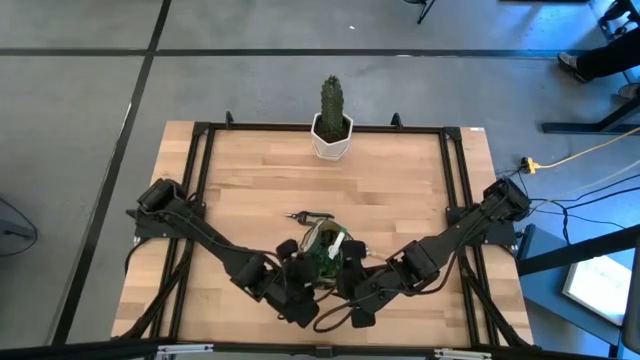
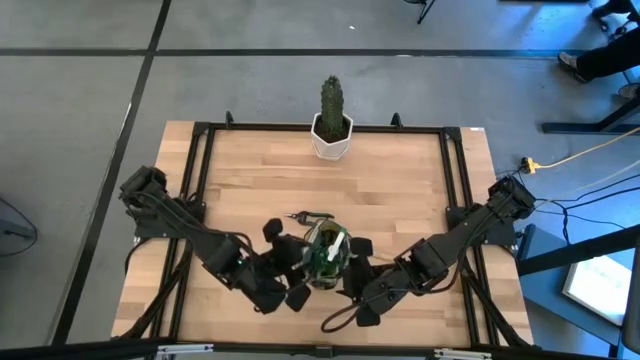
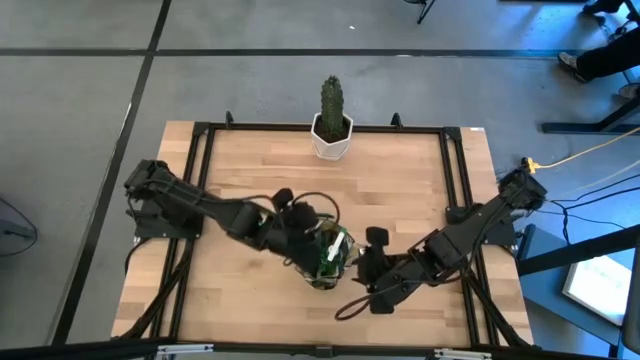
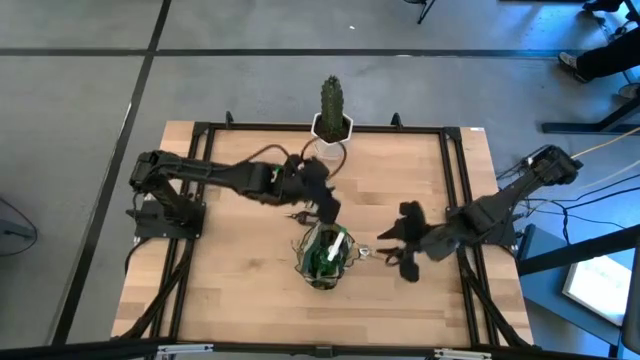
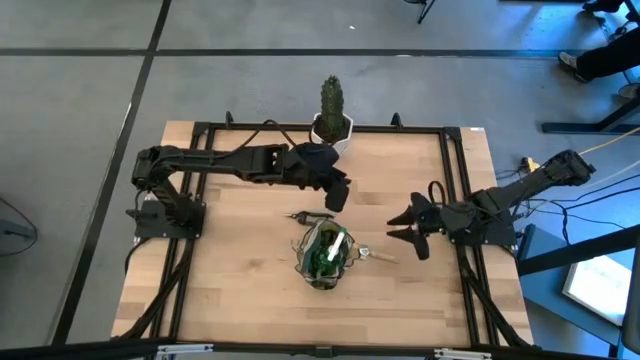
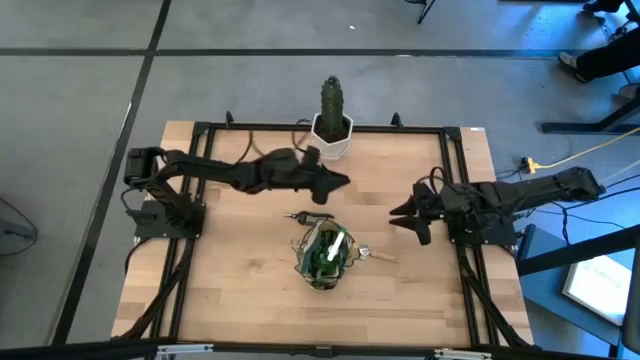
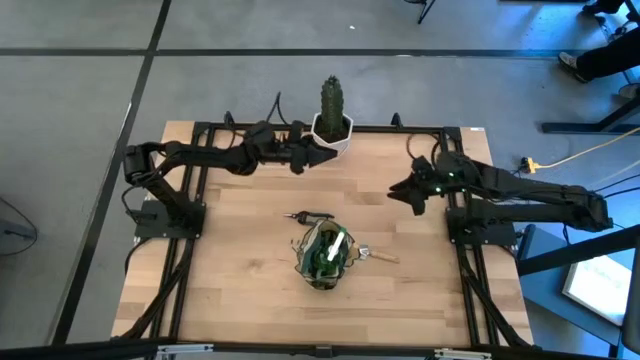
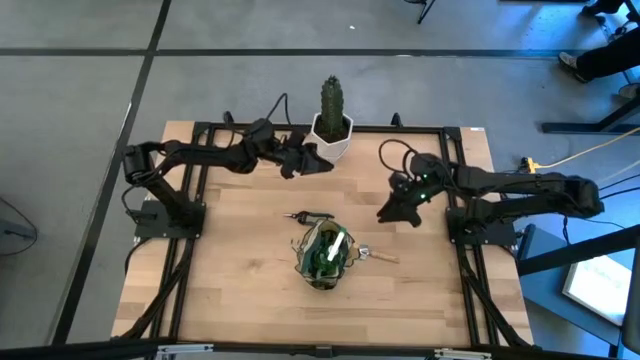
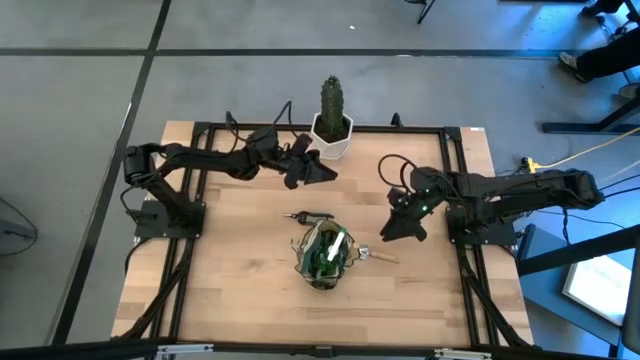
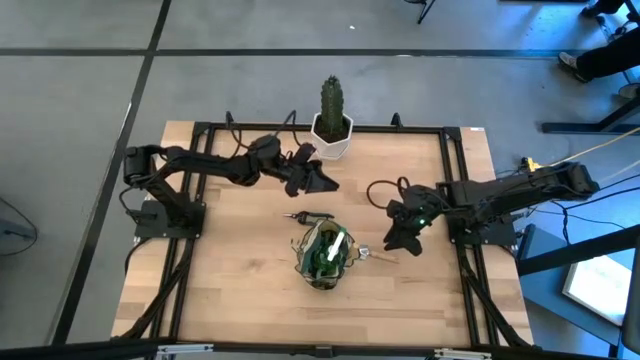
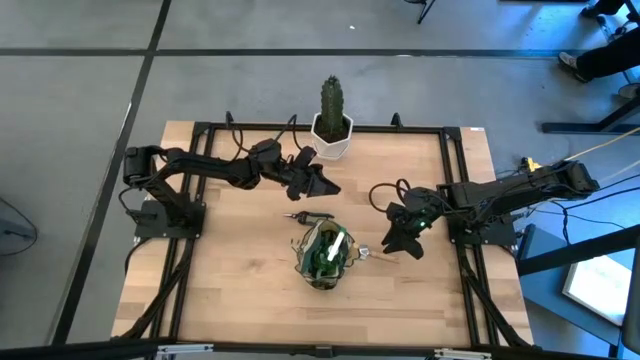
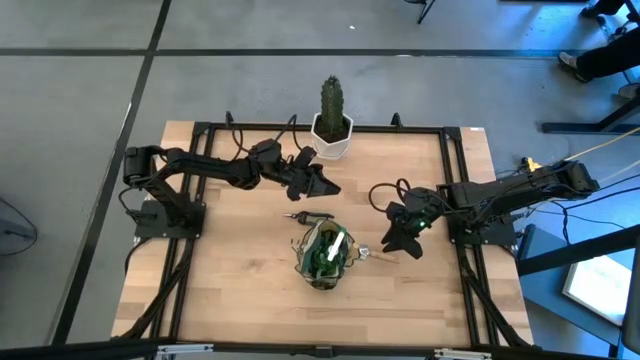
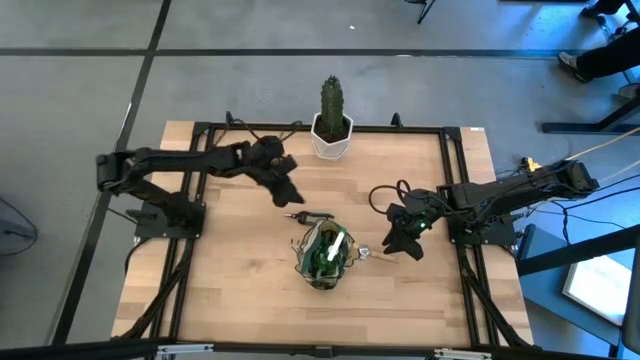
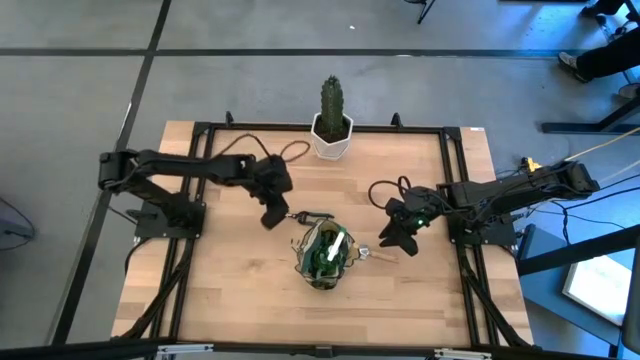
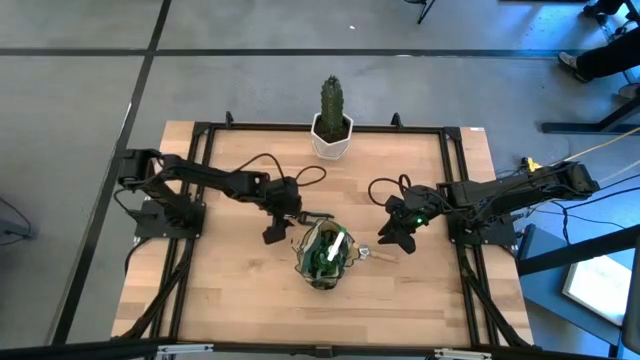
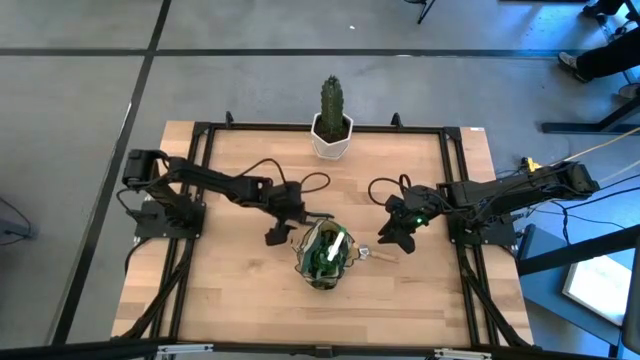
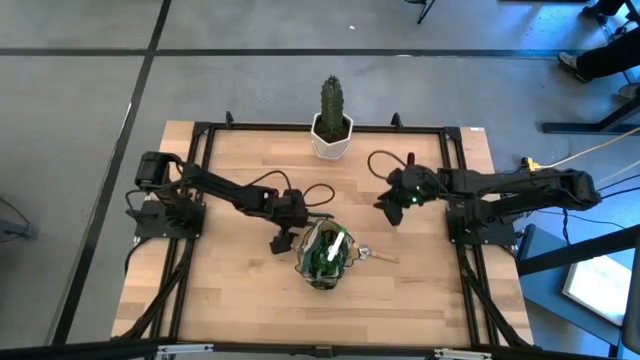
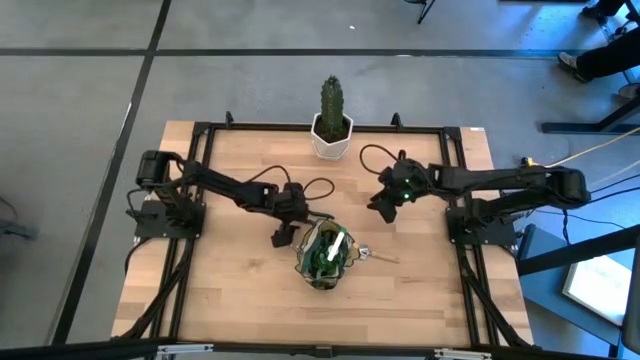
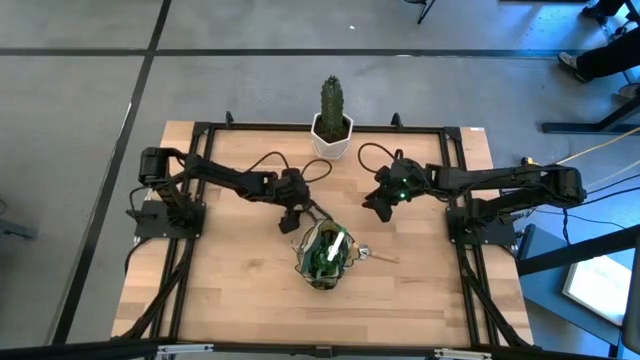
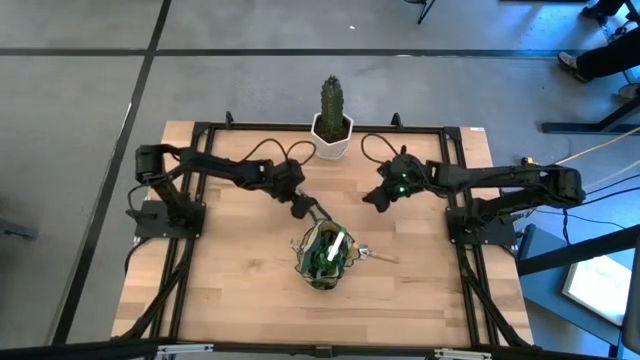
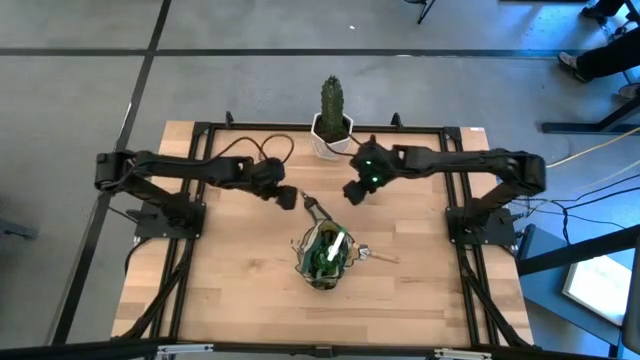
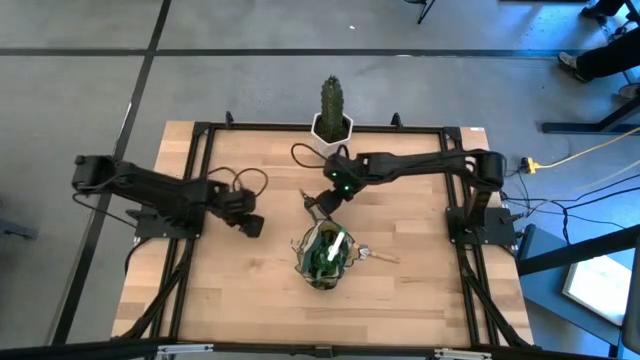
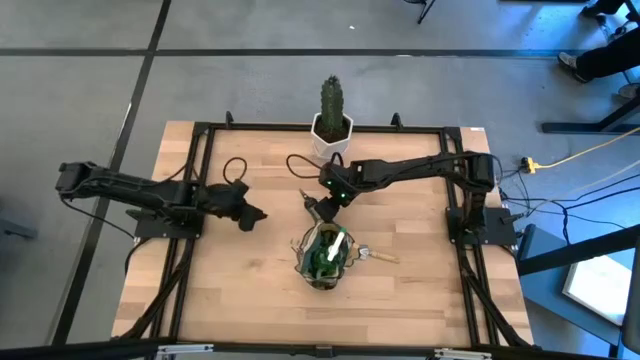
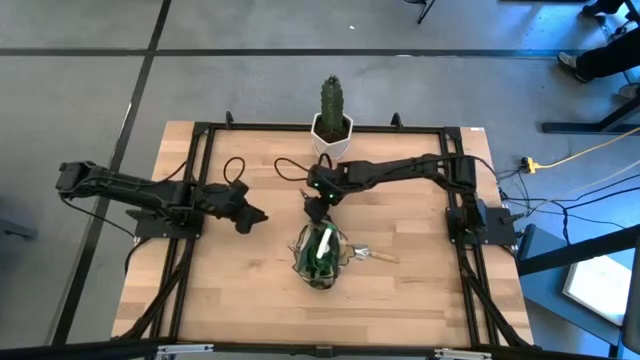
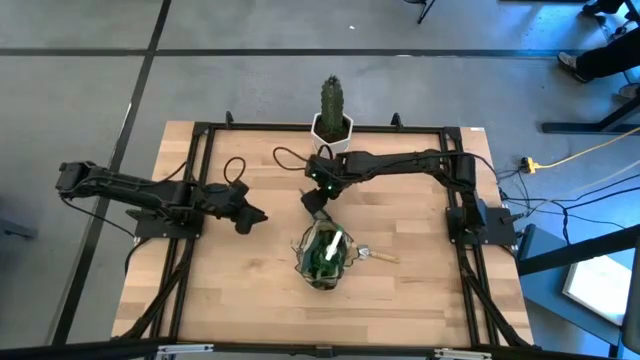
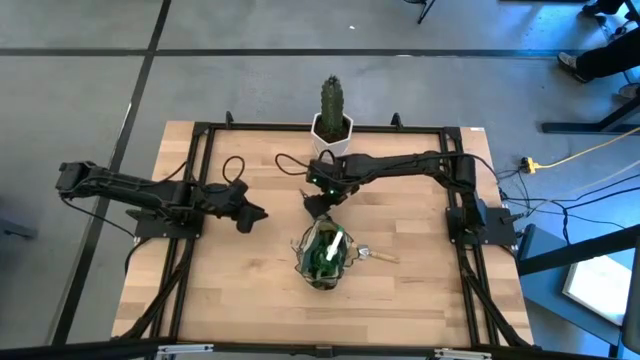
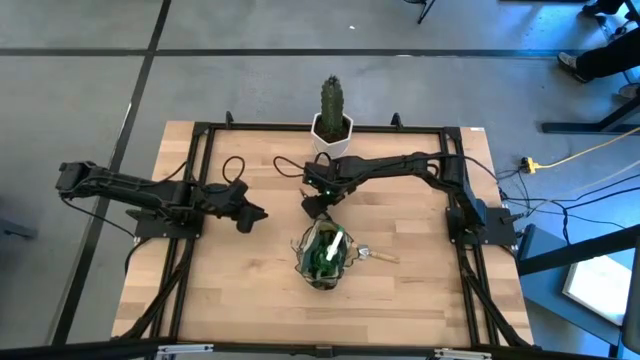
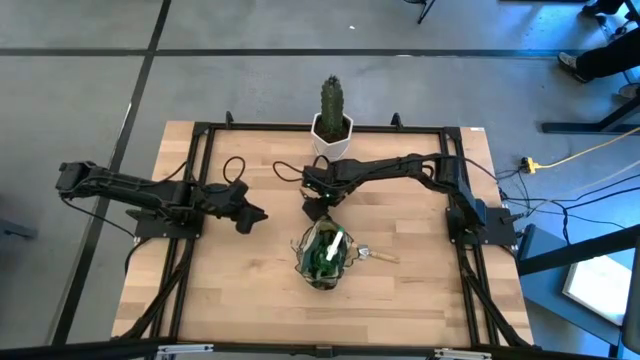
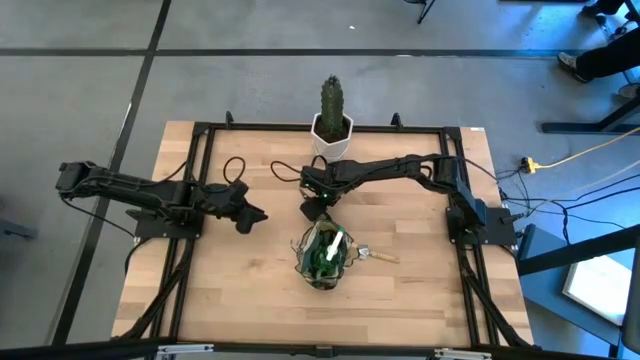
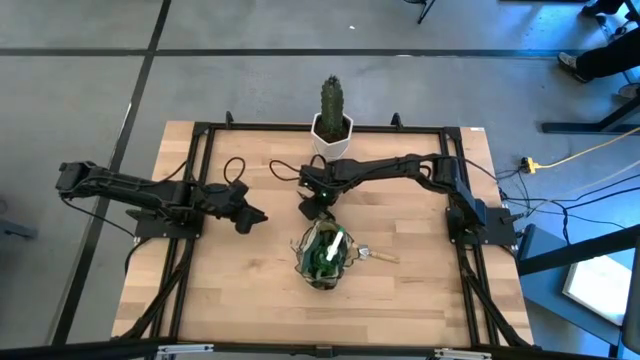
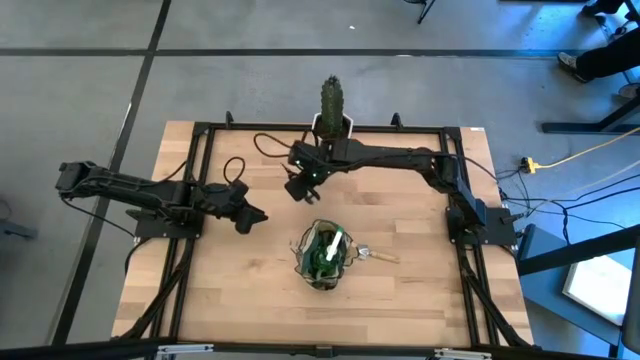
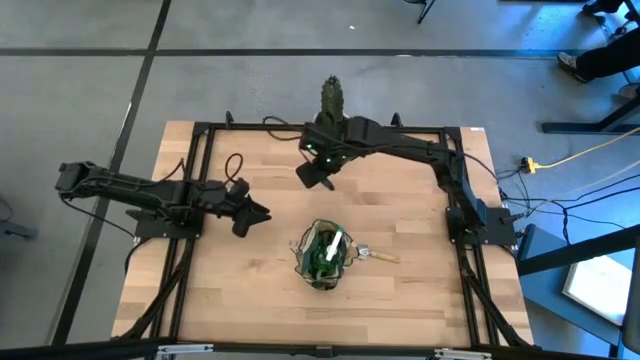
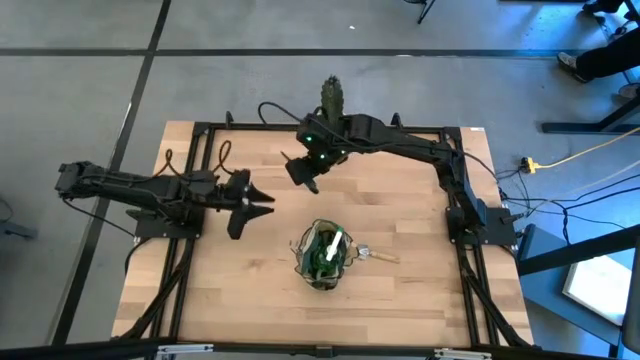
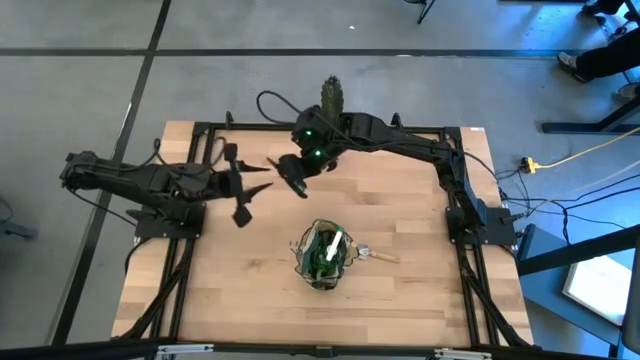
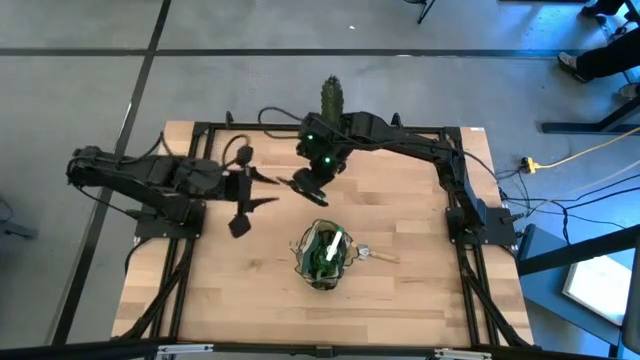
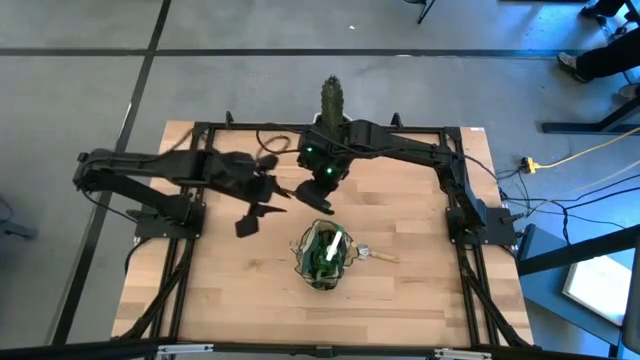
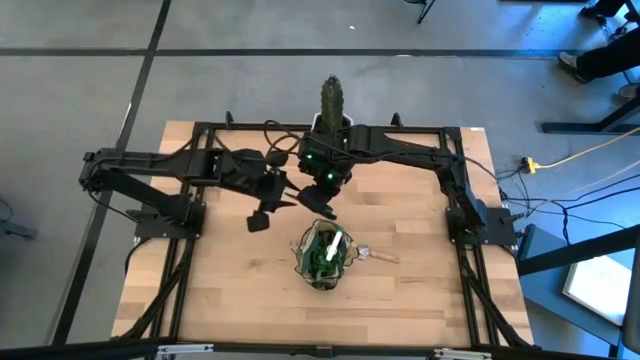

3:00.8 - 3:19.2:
Task: Pick & Place Garden tools in Gardening bag
Put the shear scissors into the gardening bag

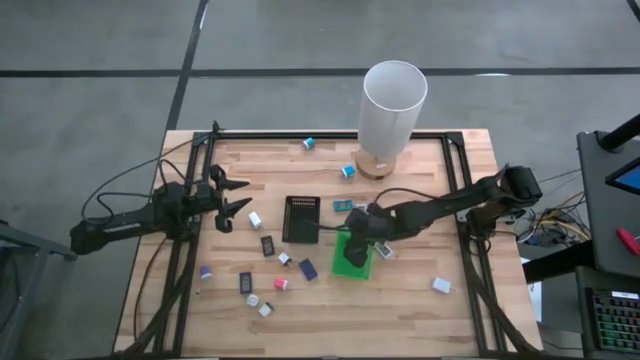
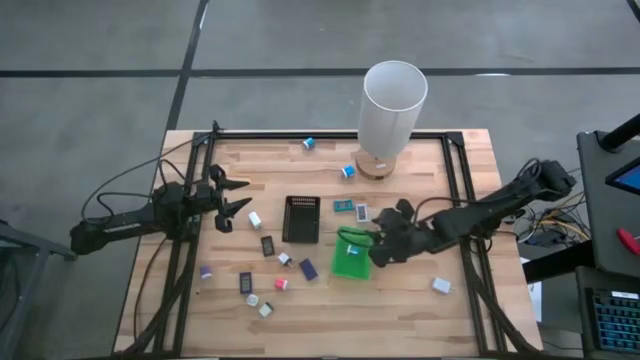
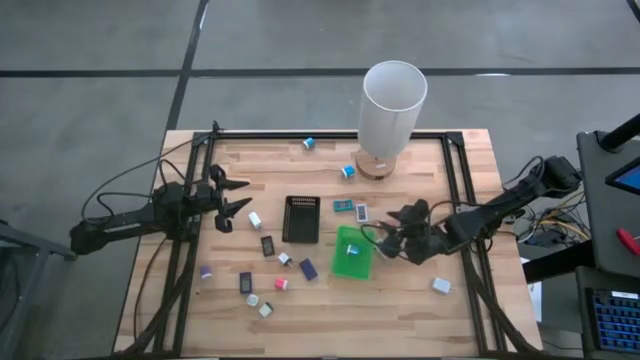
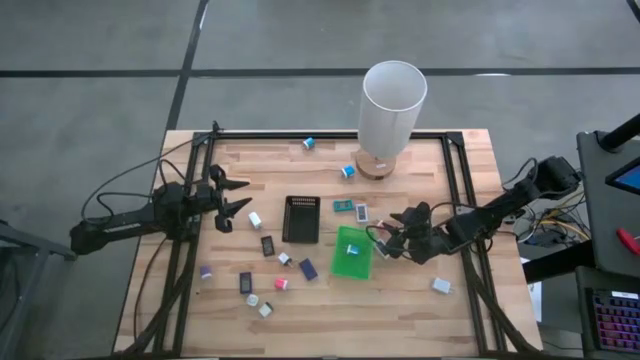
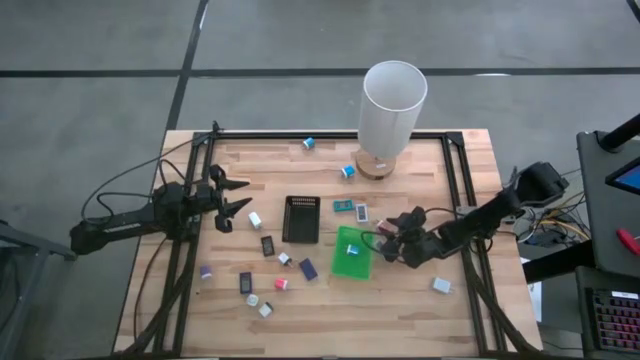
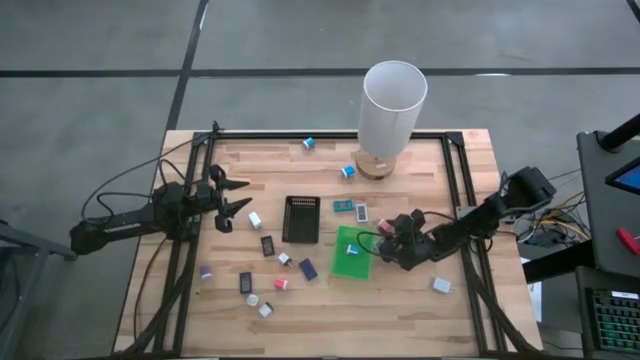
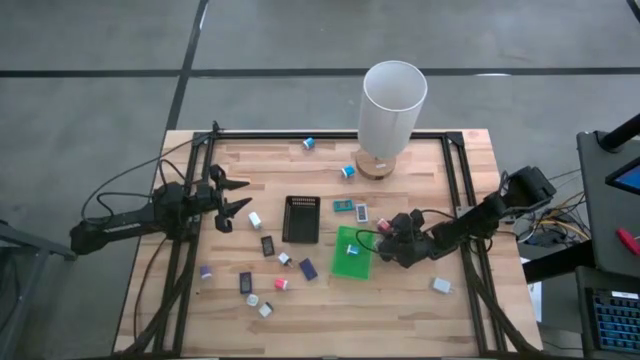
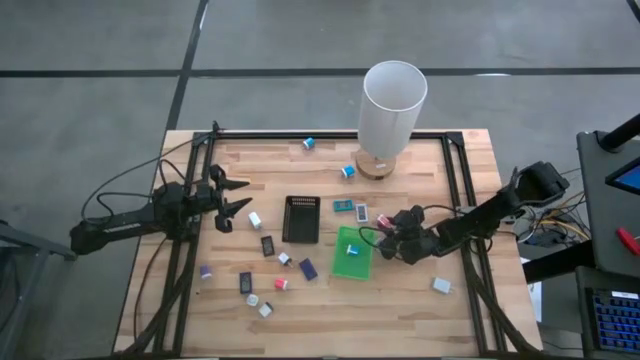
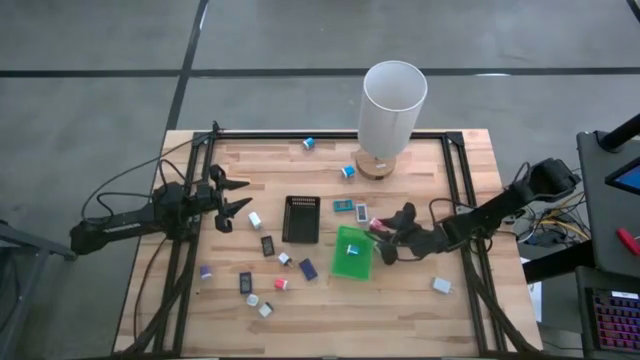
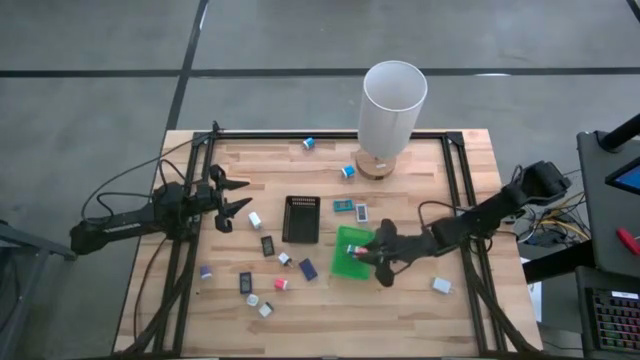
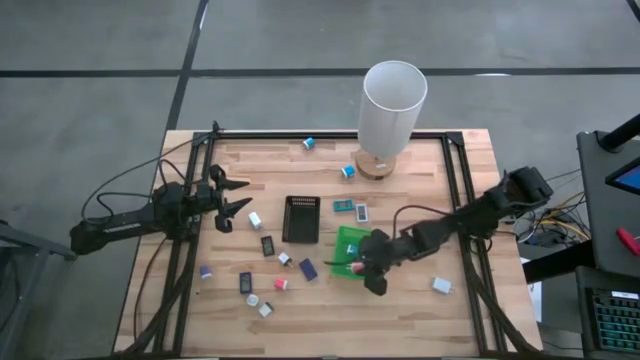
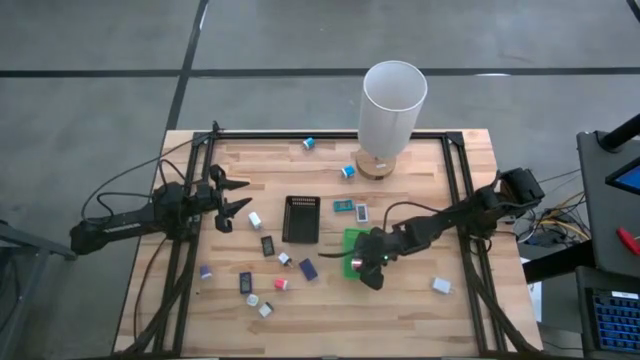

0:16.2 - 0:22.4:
Task: Pick & Place Office items
Put the top pink charger adapter into the green bin
